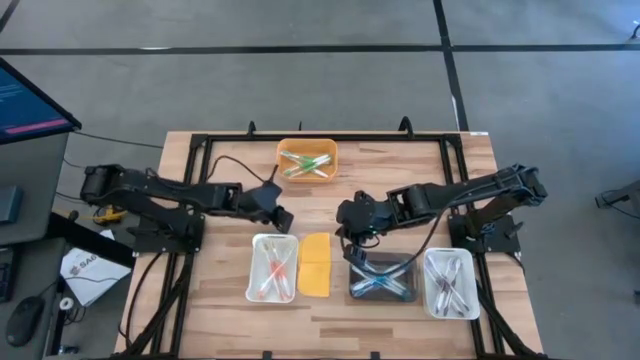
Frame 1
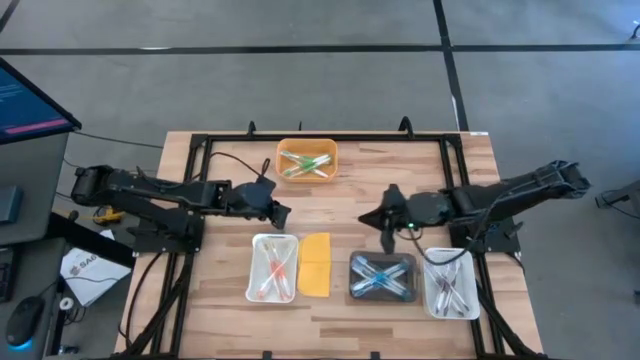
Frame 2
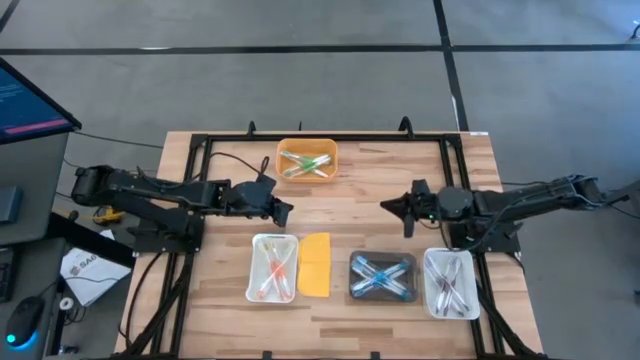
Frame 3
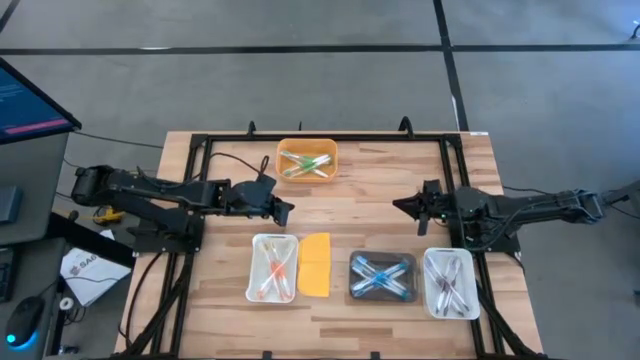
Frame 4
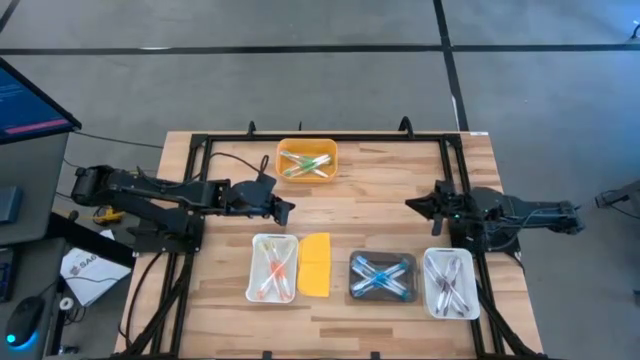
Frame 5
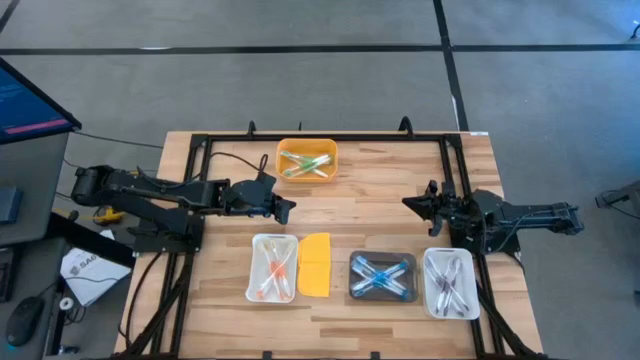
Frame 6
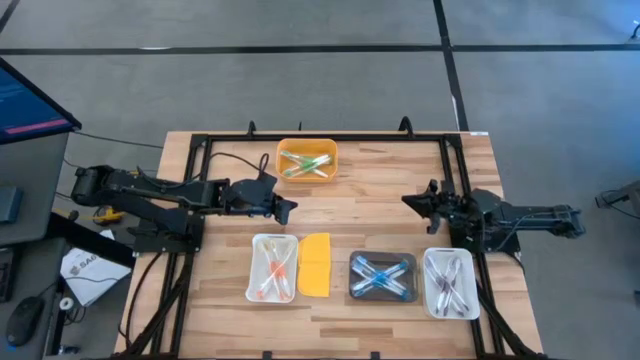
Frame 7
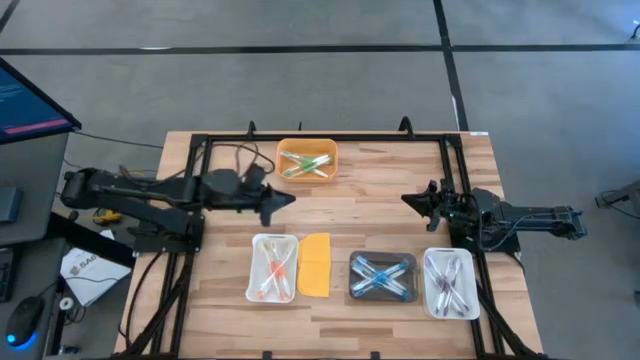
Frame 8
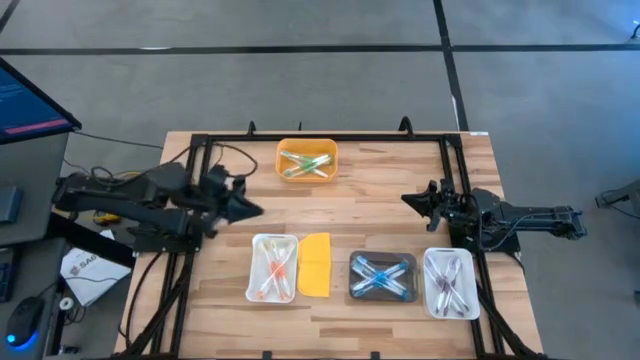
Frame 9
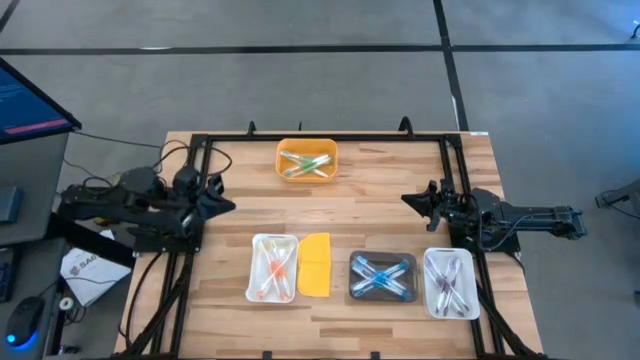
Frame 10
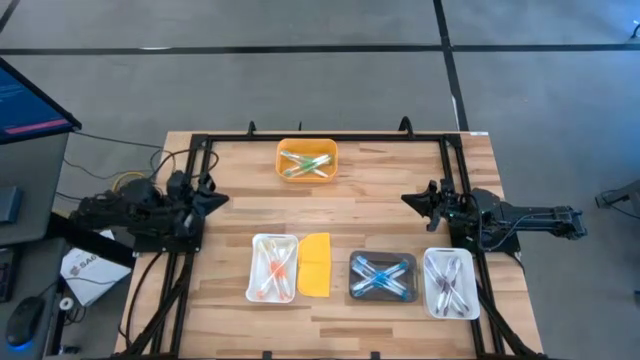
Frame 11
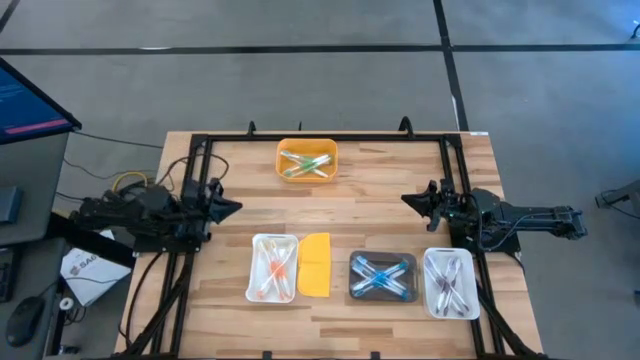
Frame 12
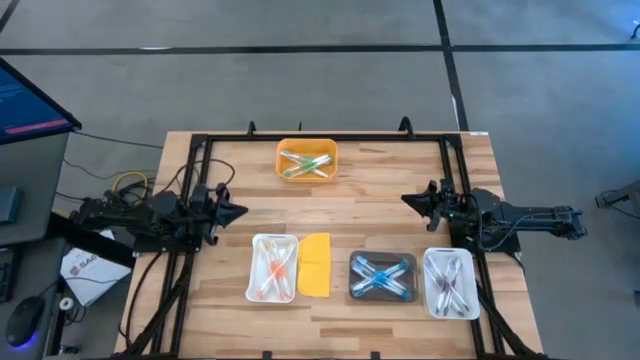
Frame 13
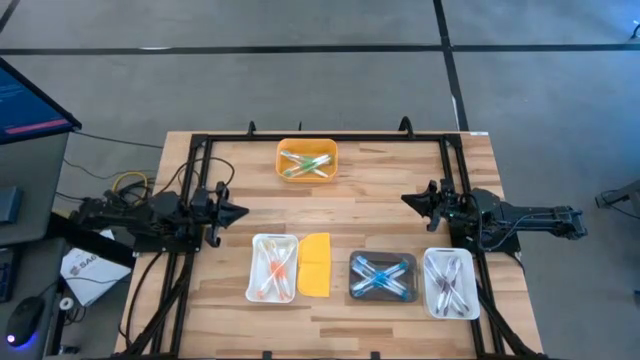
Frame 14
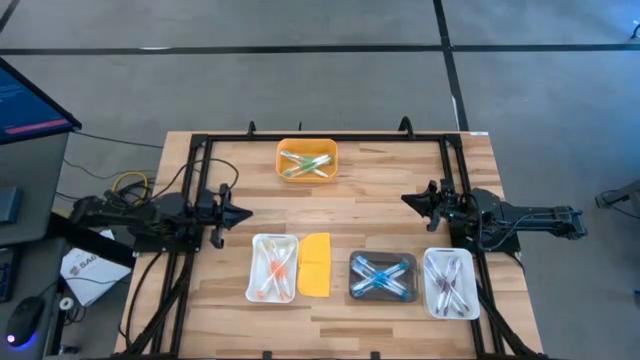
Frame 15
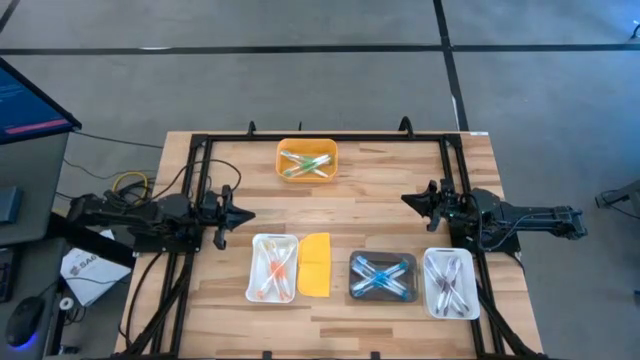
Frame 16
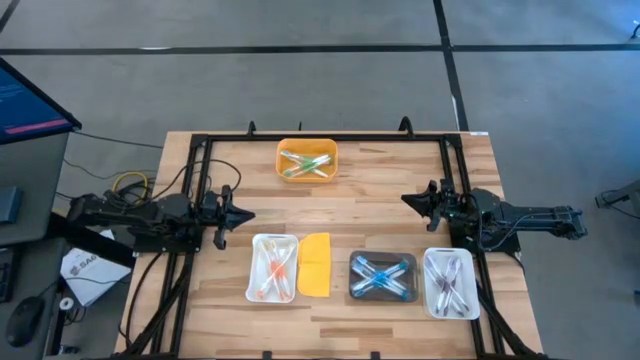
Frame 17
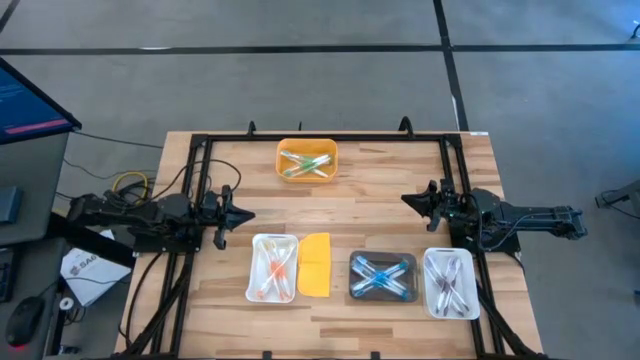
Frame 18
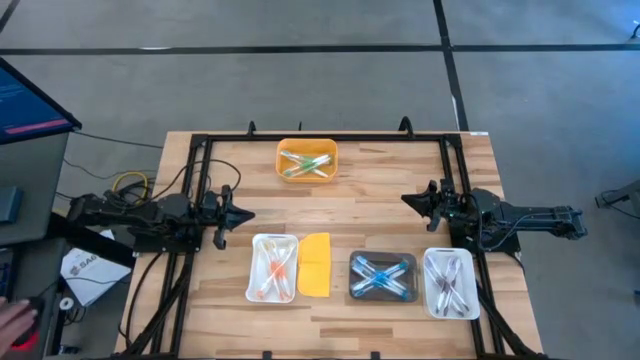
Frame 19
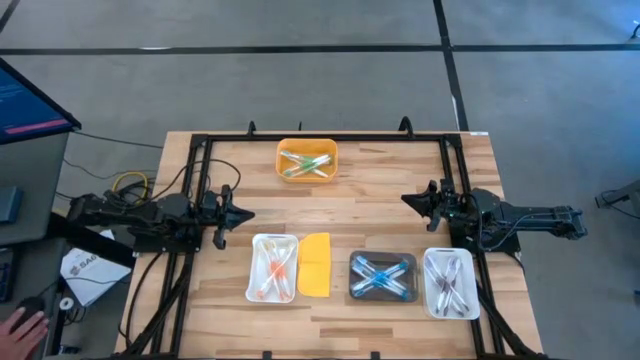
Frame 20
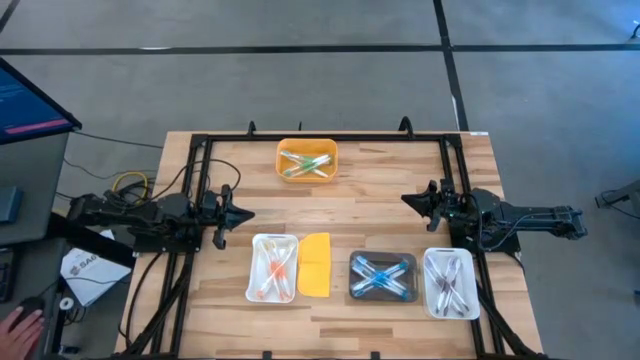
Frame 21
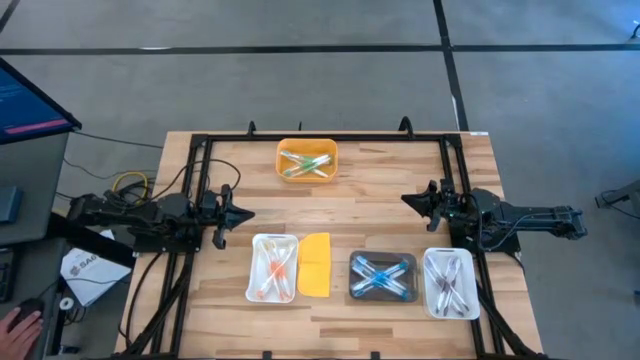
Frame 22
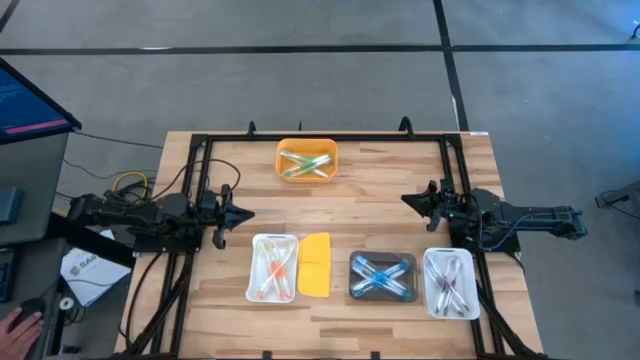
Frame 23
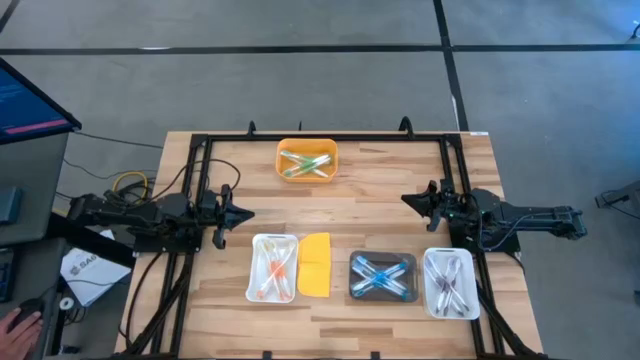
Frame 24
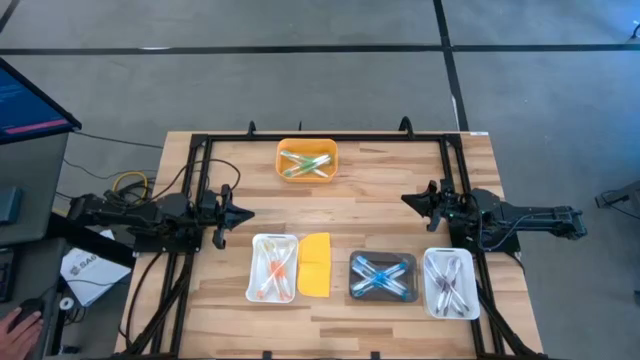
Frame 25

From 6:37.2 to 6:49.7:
Task: Pick & Place Toothbrushes
Return to Home Position

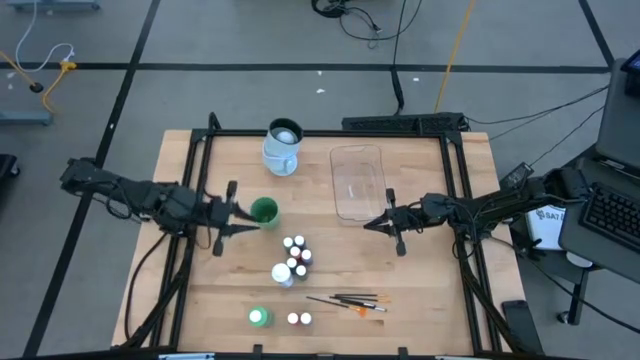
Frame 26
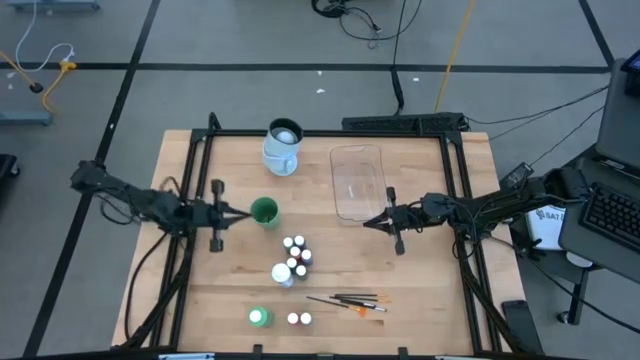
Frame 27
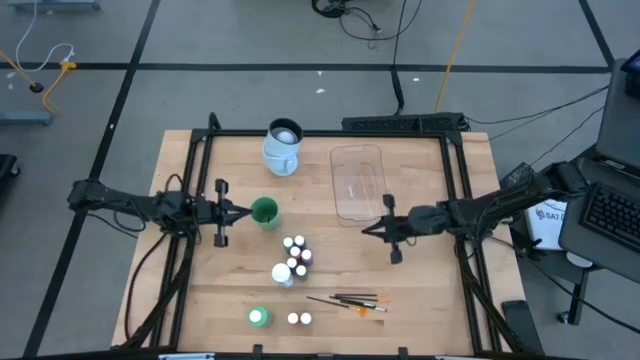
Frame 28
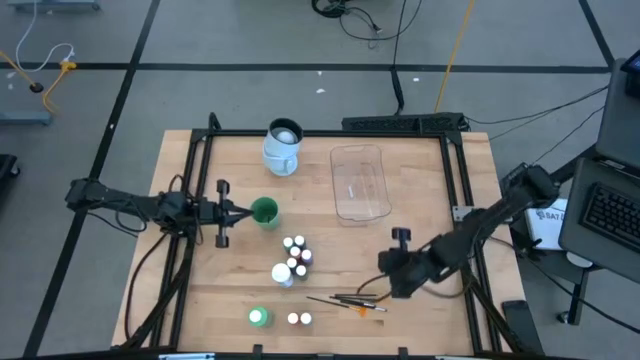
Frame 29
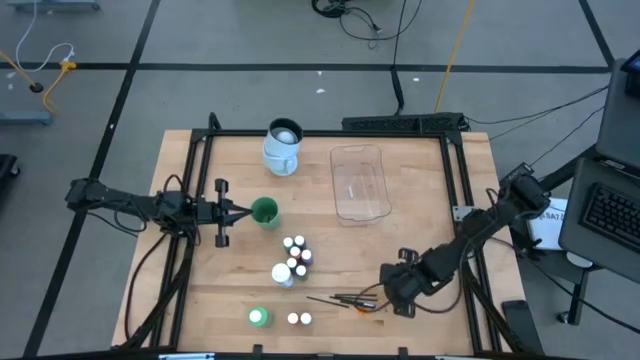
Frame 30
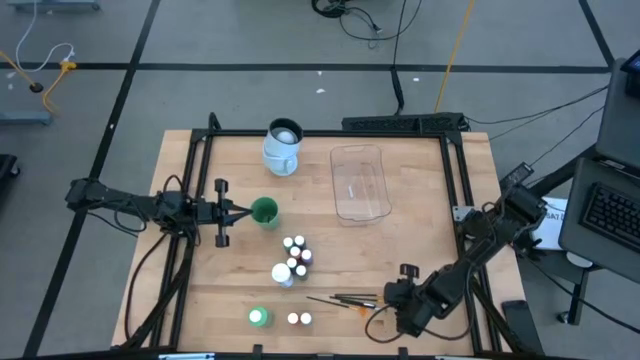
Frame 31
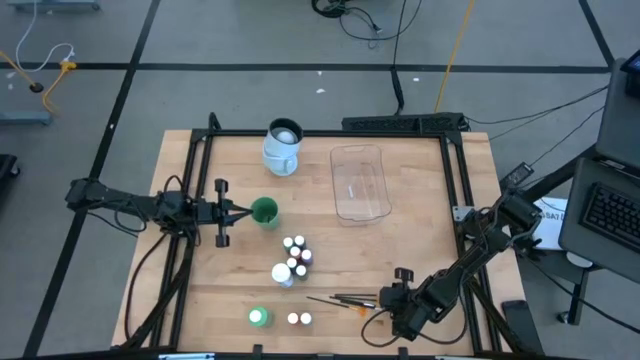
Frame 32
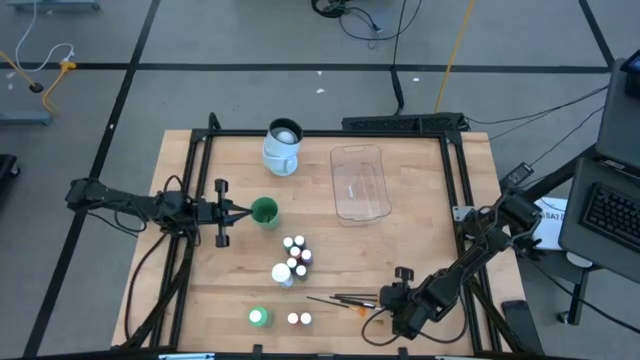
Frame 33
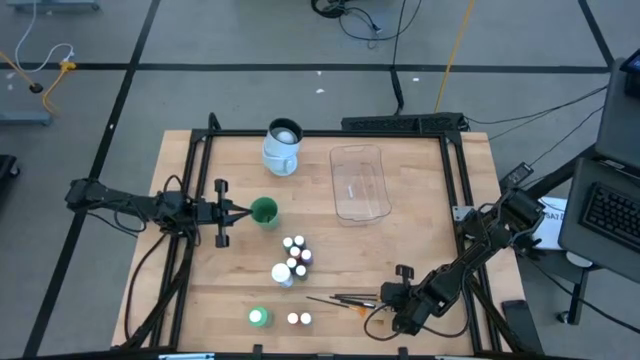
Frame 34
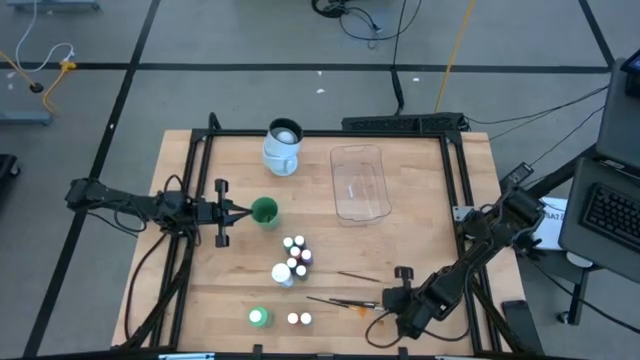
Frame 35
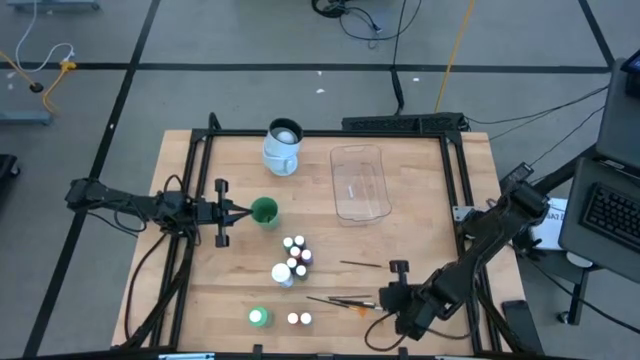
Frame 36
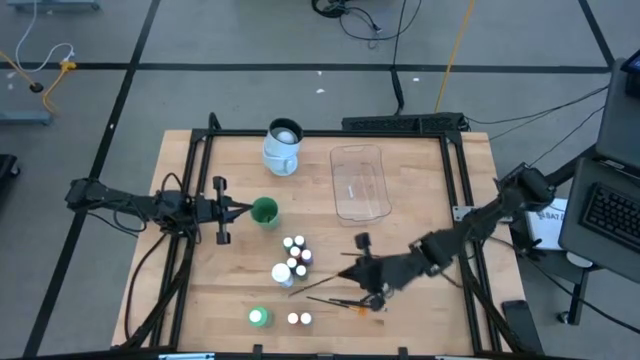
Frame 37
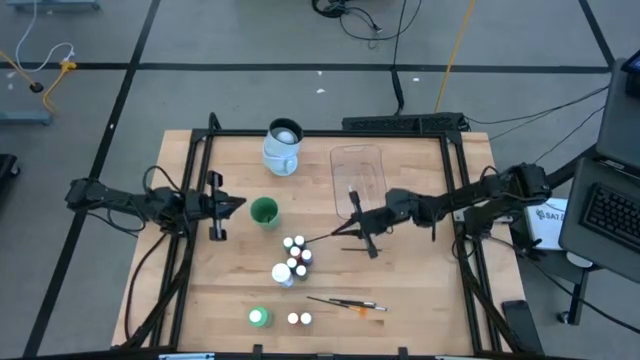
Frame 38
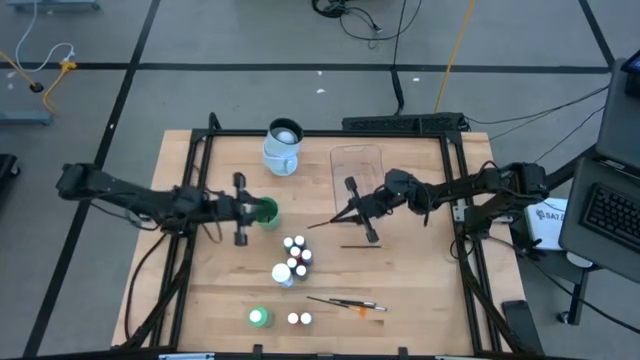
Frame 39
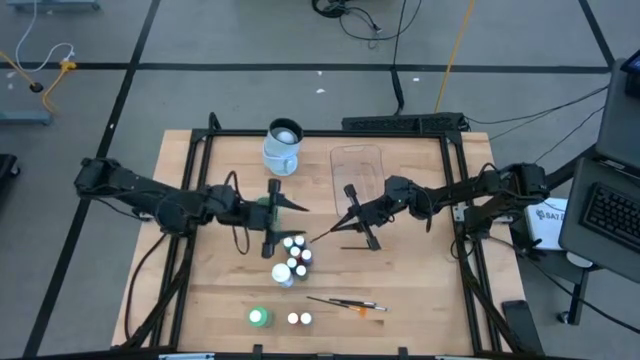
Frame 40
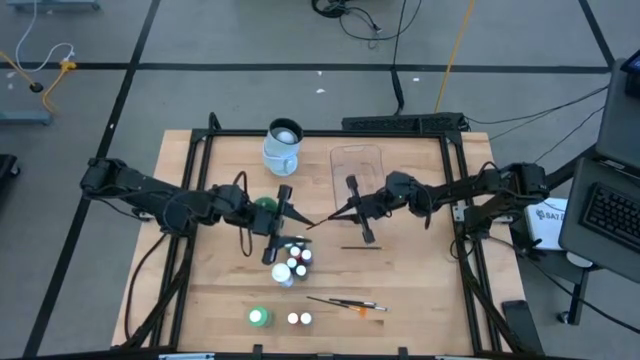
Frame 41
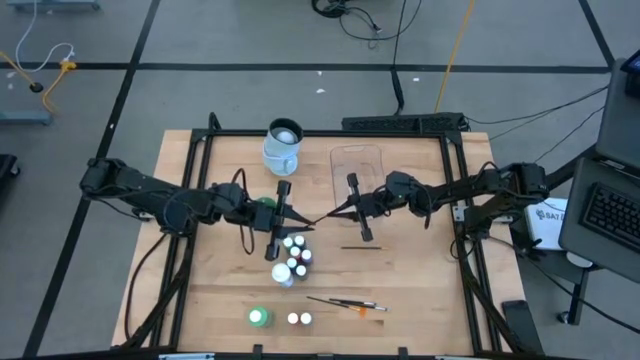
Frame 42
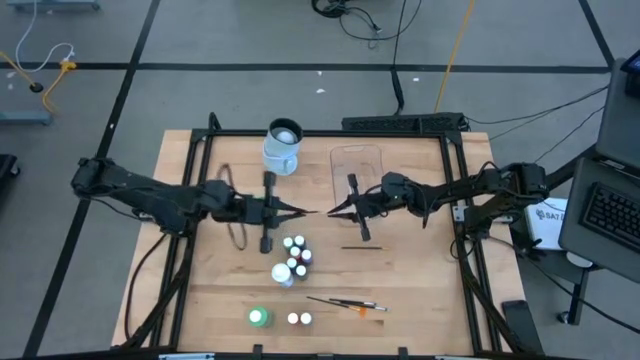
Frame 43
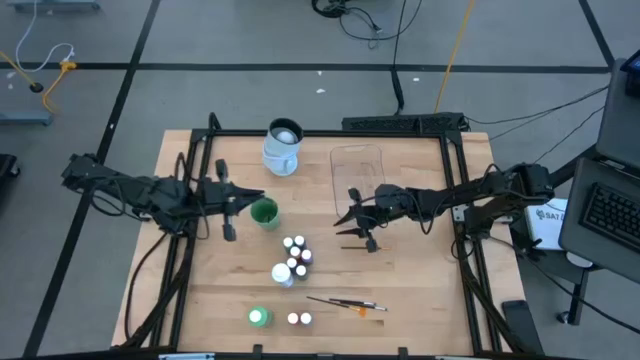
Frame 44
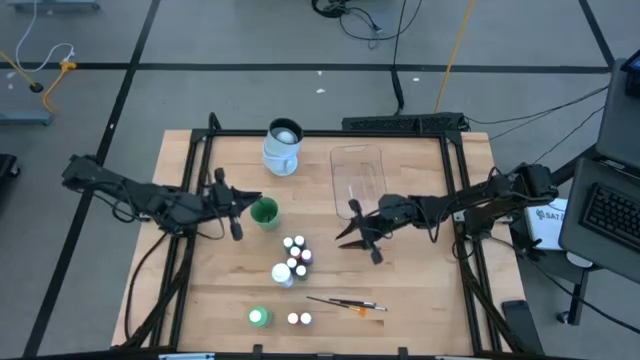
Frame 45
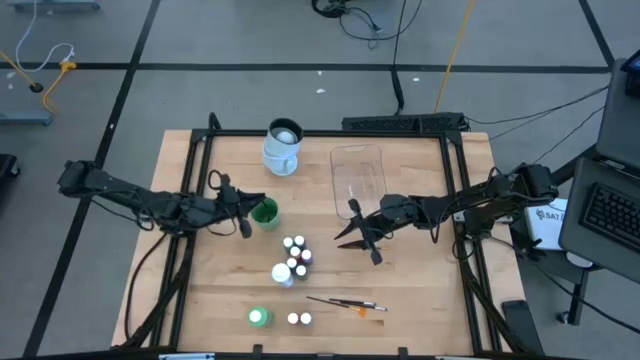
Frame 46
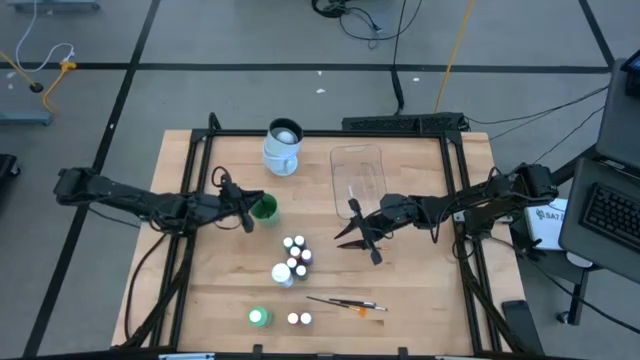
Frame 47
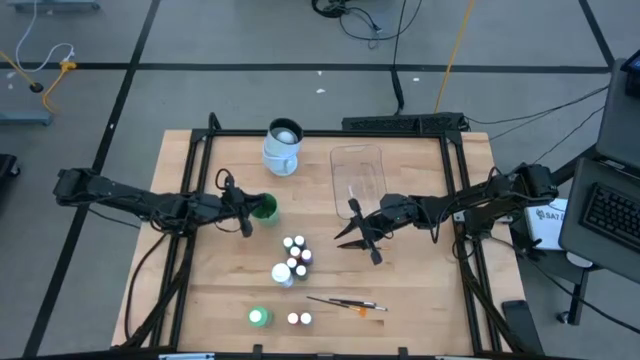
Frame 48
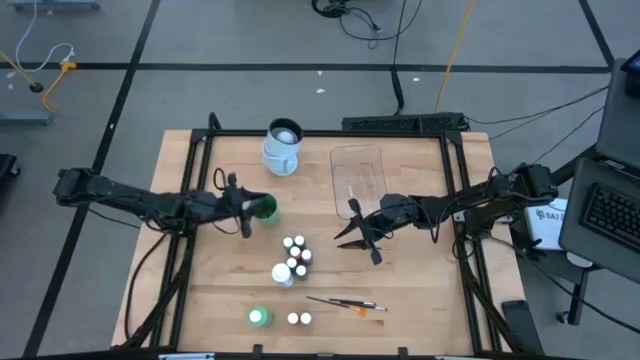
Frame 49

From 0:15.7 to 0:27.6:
Task: Pick & Place Paint Supplies
Put the gold paintbrush into the green cup
